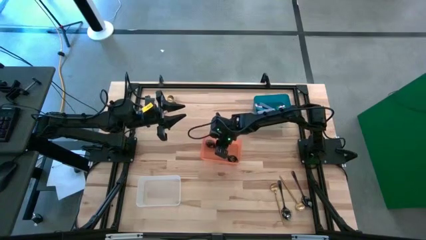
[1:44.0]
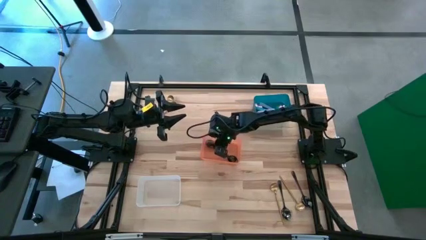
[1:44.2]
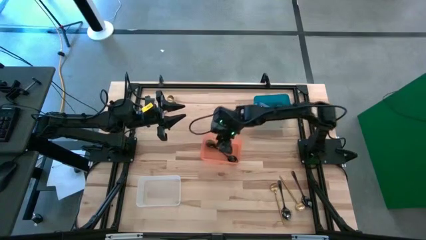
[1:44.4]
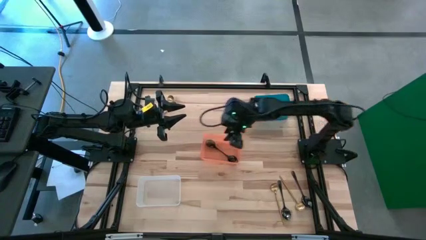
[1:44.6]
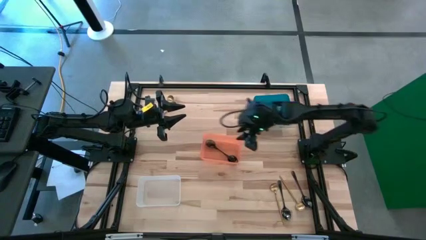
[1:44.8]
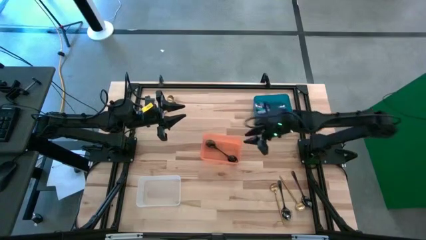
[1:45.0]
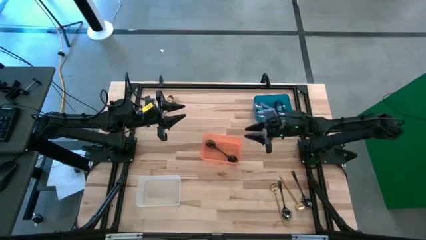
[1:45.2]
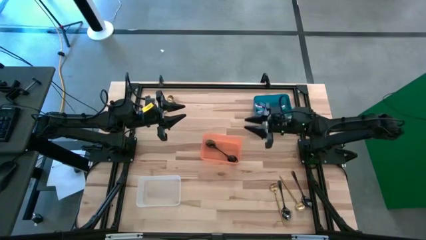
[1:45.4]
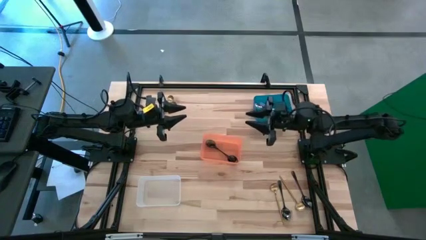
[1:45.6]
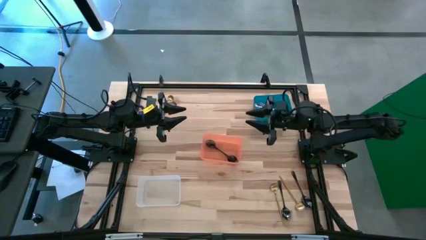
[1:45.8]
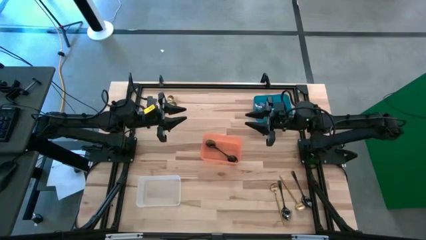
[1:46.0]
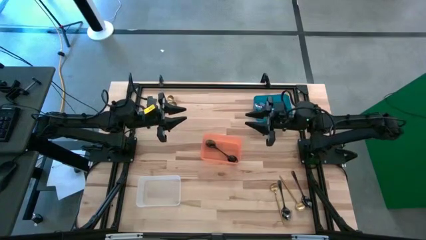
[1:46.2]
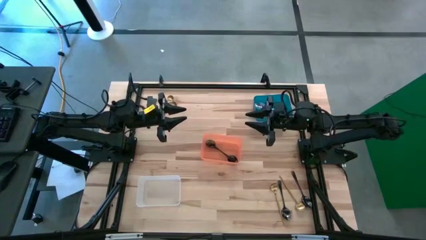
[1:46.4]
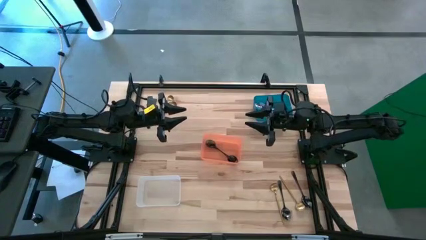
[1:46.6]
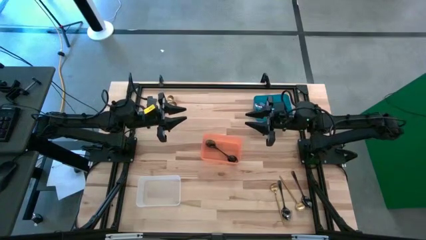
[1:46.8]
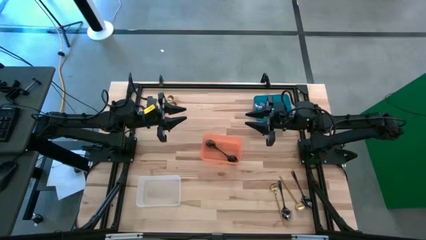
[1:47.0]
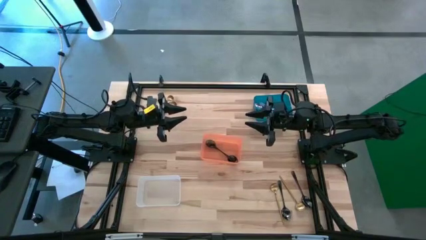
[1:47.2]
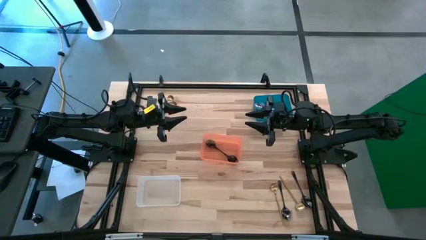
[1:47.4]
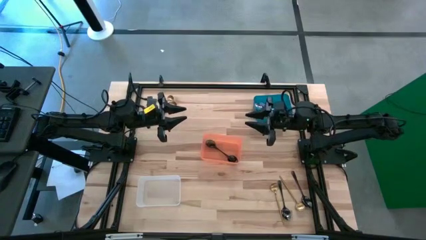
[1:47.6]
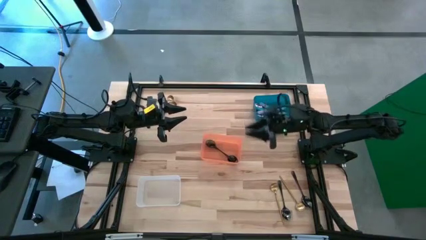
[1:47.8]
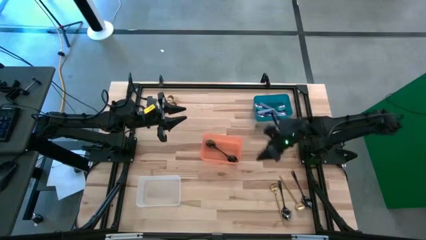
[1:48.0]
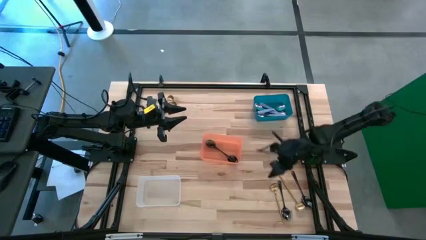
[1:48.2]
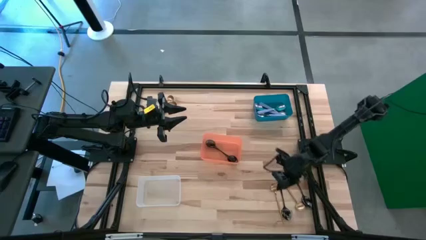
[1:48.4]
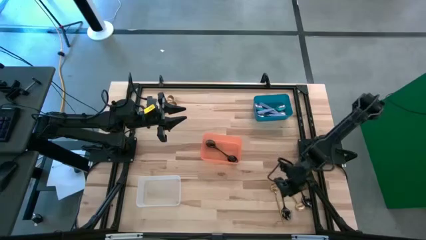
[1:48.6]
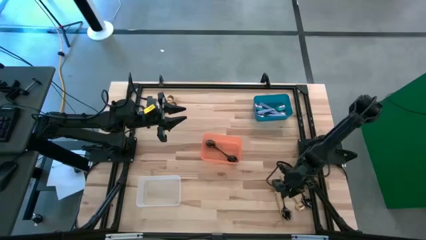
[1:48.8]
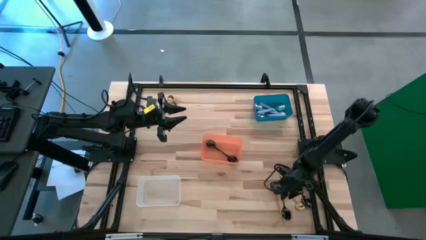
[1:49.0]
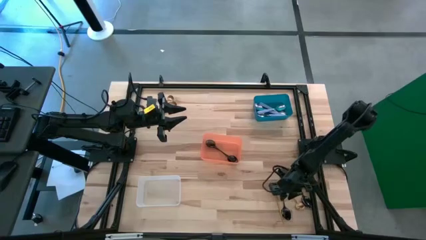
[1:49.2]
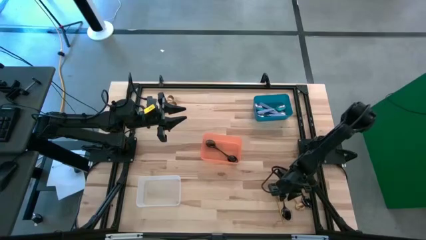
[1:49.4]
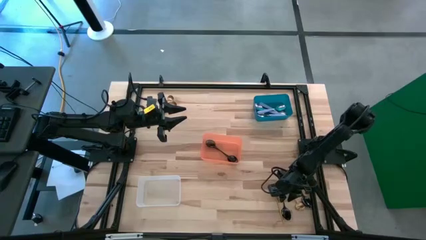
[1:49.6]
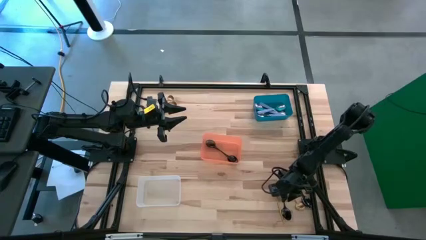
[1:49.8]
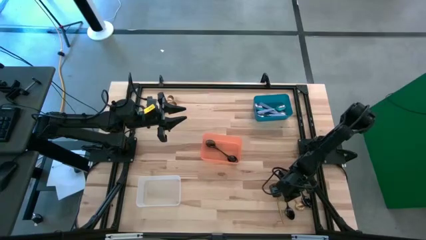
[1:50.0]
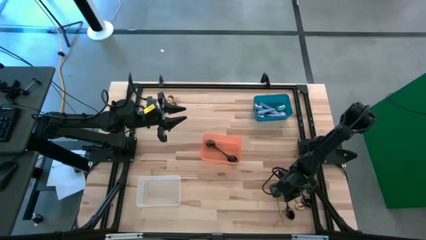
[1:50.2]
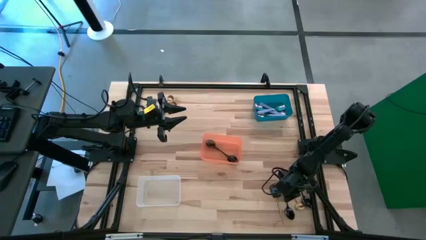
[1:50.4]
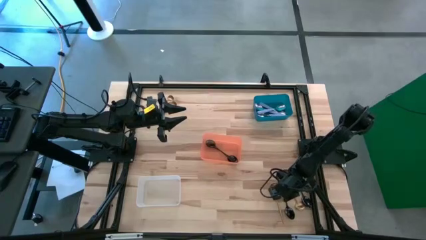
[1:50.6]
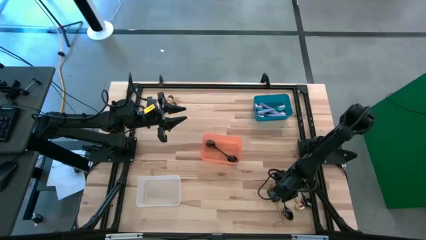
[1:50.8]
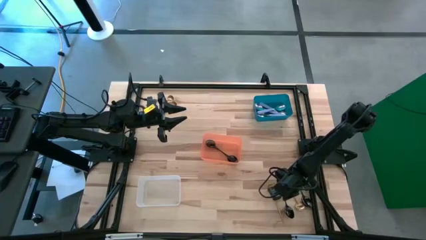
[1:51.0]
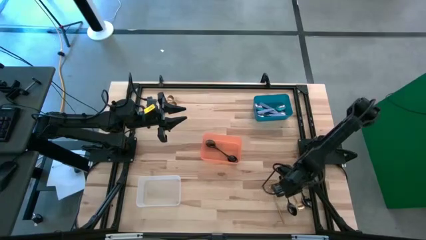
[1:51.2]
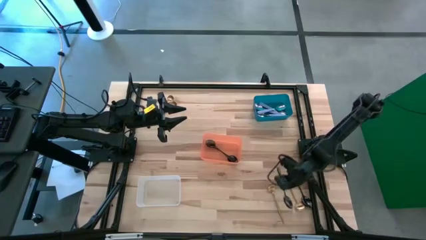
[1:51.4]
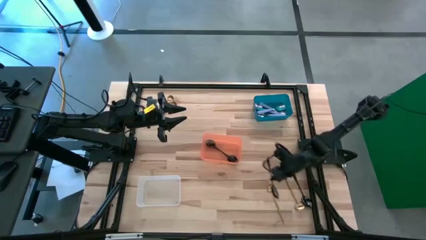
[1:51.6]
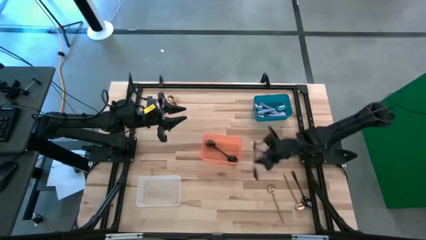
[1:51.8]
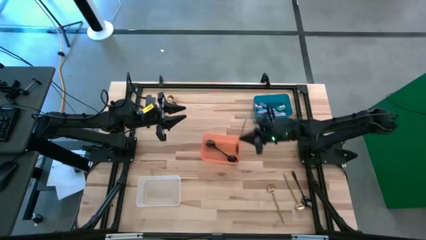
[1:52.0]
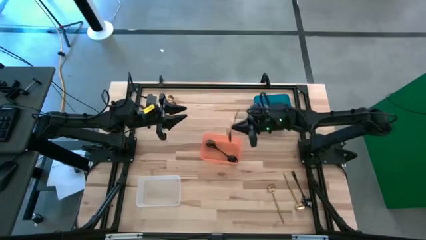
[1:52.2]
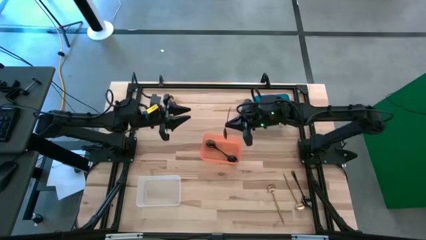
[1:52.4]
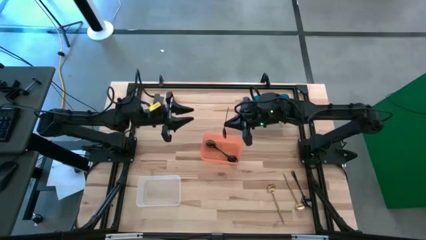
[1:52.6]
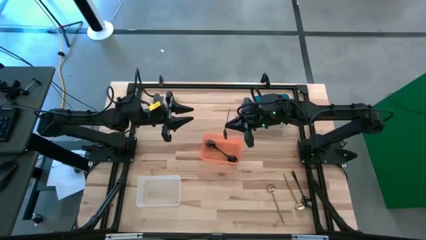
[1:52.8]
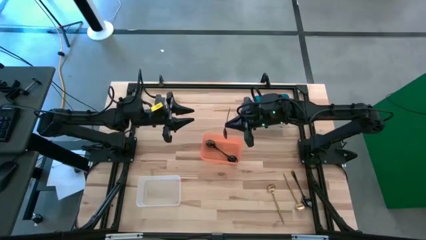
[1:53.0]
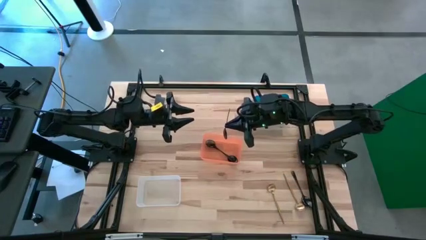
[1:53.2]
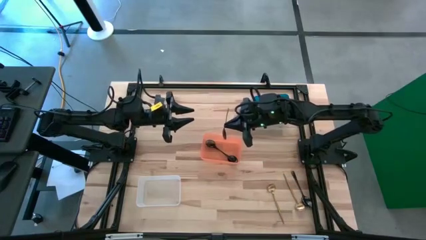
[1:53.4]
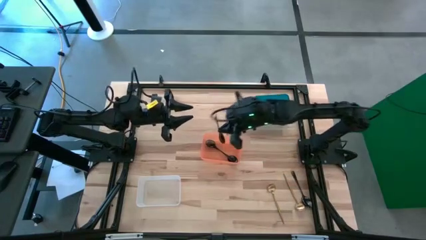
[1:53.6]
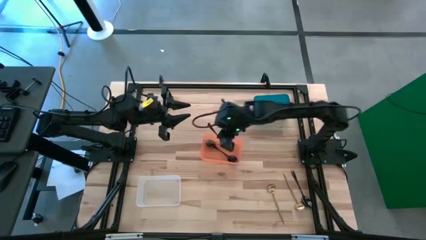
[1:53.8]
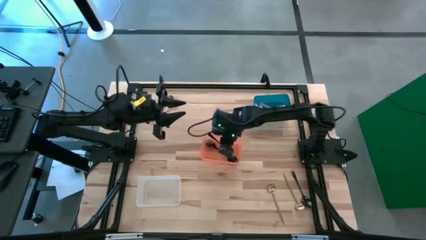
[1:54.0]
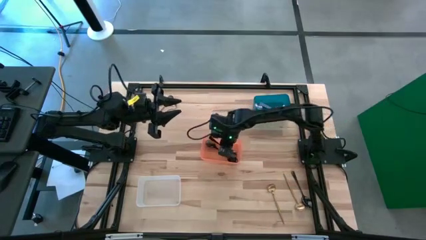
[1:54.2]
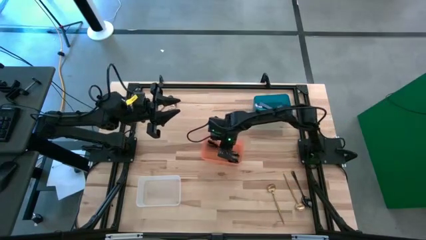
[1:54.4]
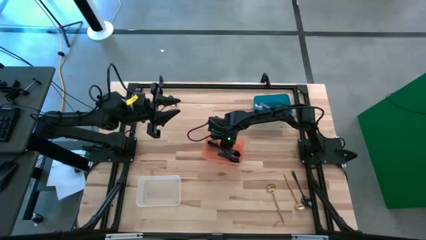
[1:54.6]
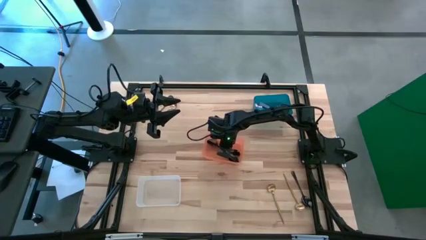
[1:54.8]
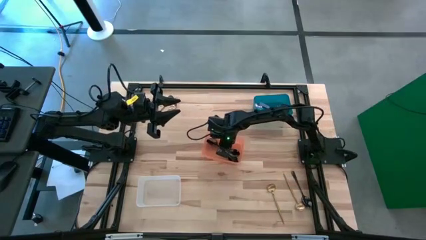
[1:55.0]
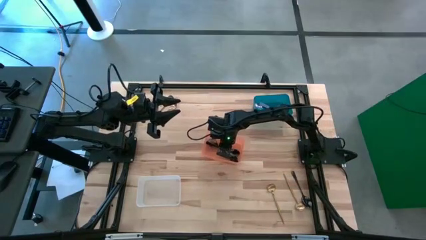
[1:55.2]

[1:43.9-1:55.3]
Task: Sort silverware by color (type)
Put the left black spoon into the orange bin

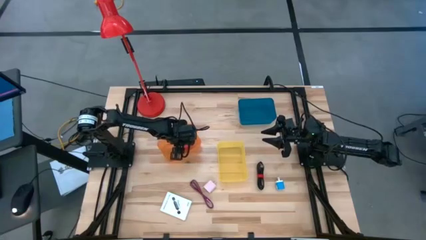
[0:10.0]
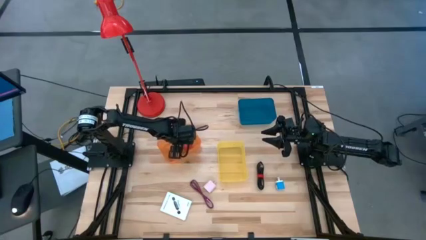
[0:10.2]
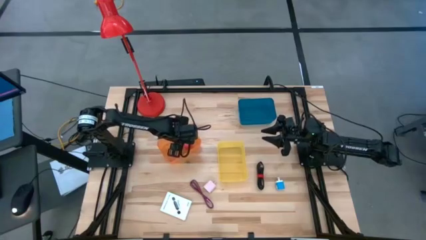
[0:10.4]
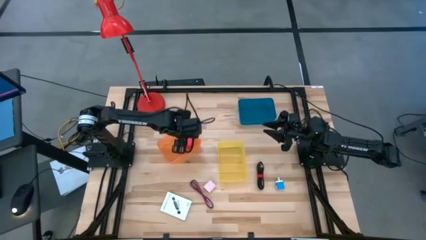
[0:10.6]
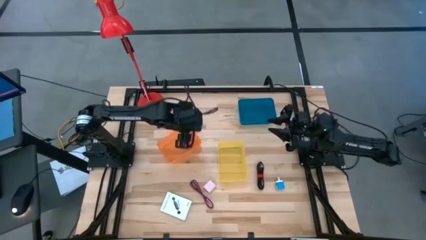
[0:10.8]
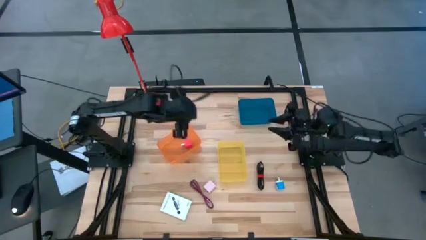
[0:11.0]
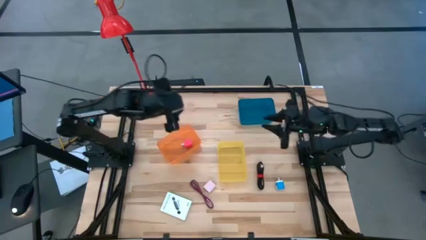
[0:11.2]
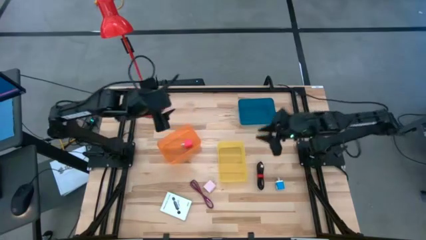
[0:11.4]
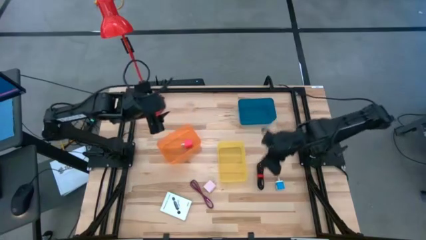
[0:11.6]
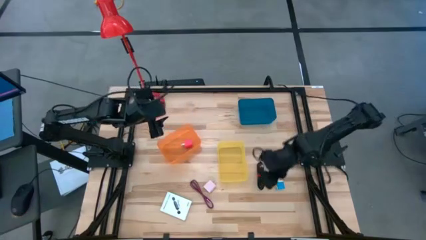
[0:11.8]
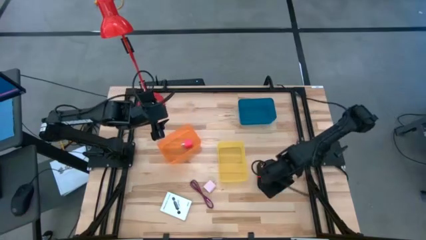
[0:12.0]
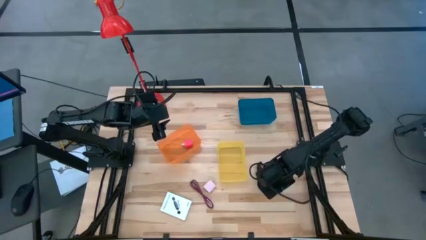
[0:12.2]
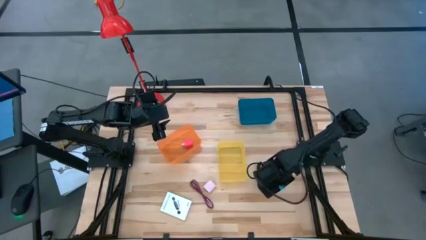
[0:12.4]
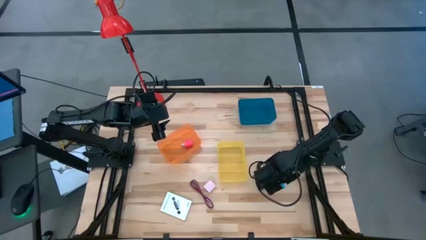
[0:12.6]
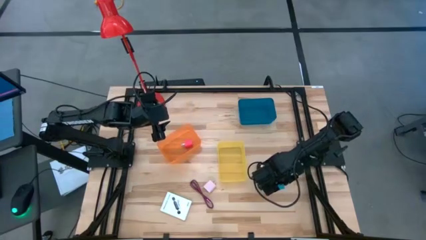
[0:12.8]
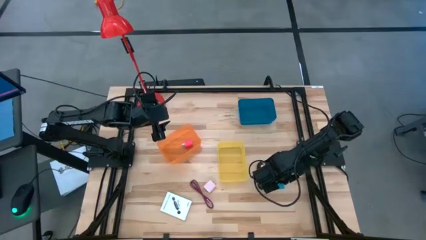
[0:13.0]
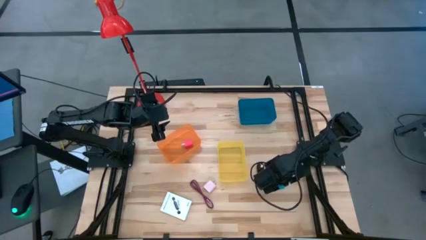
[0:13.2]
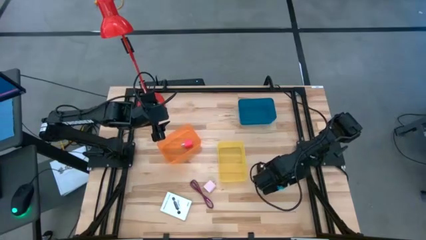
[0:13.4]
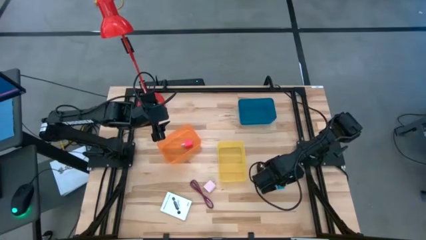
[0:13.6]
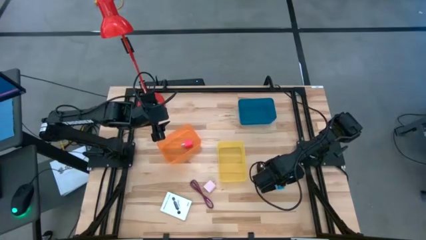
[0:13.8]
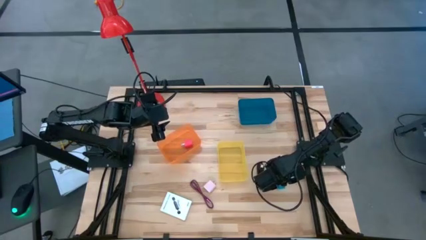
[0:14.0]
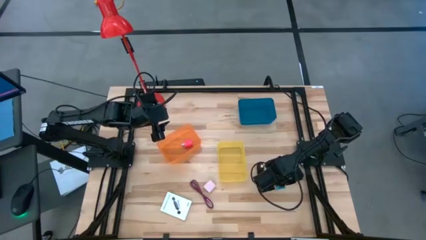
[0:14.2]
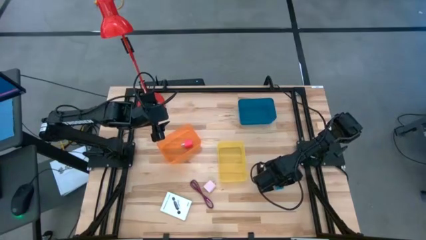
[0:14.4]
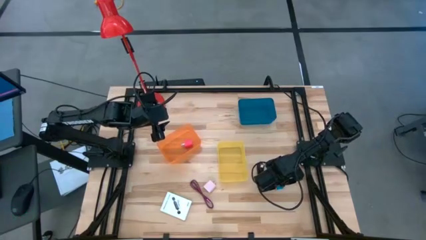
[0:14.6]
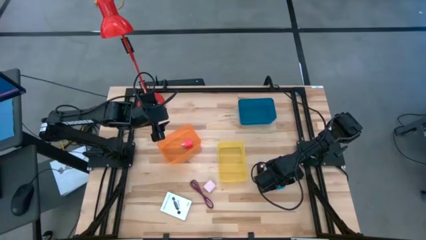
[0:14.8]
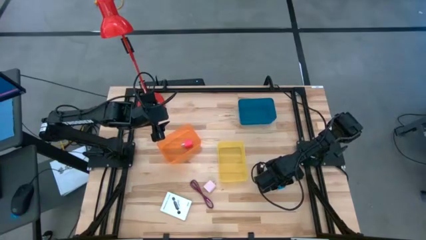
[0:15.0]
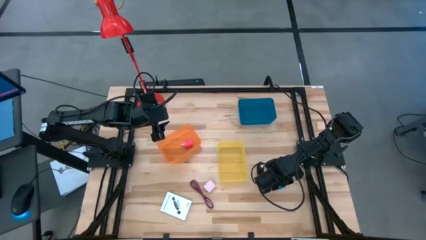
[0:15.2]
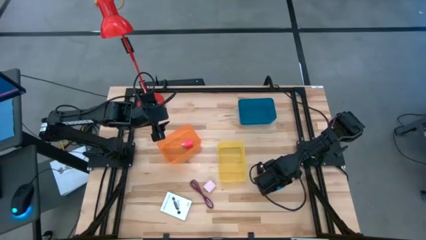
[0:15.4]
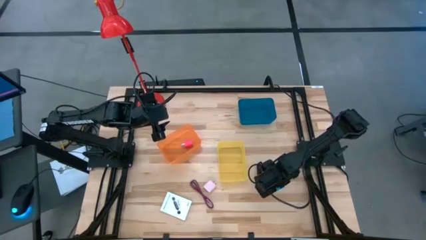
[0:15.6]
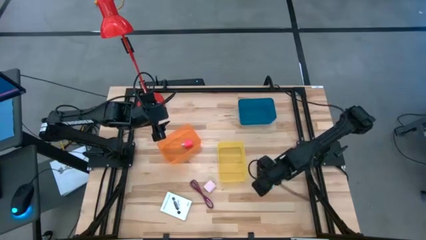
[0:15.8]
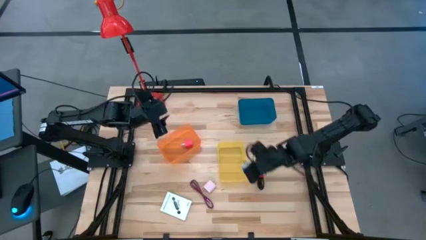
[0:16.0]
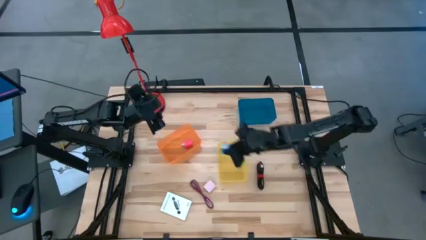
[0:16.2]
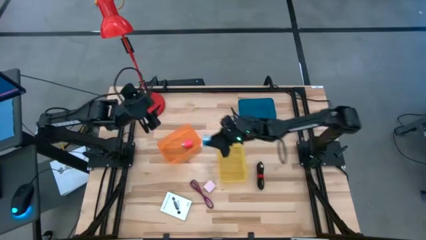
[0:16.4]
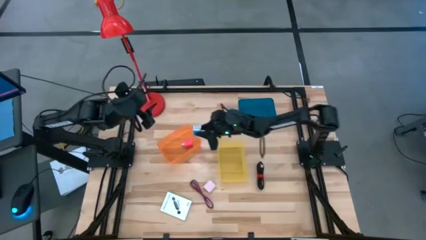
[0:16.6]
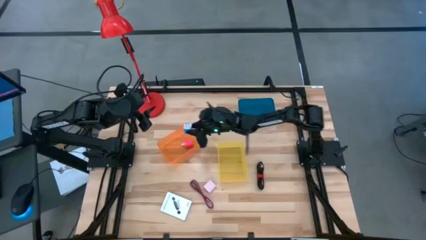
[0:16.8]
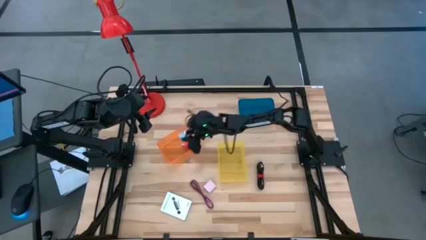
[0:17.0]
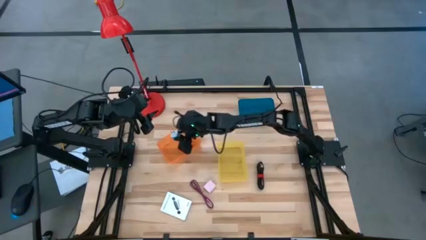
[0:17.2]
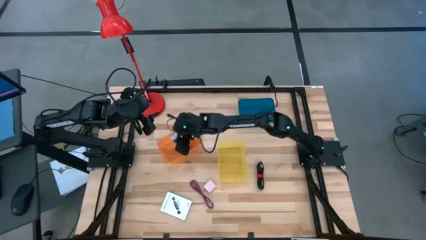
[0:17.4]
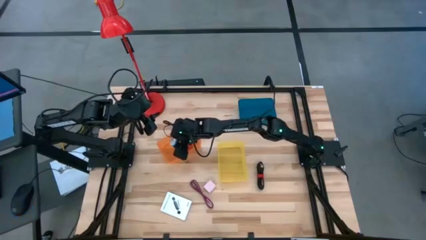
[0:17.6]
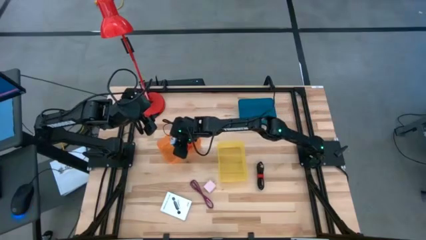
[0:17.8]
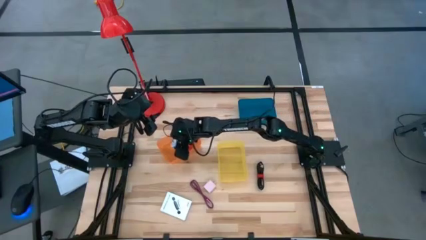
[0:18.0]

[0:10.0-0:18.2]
Task: Pick and place items into bin
Put the blue charger adapter into the orange bin
